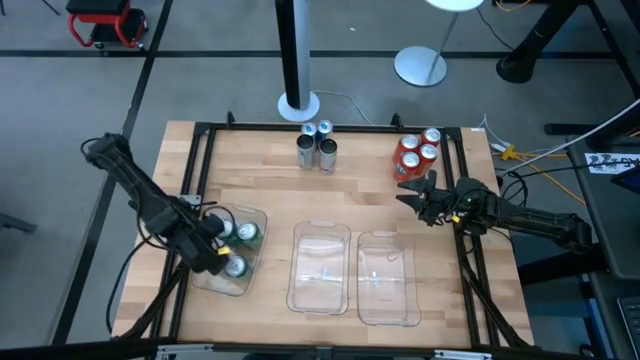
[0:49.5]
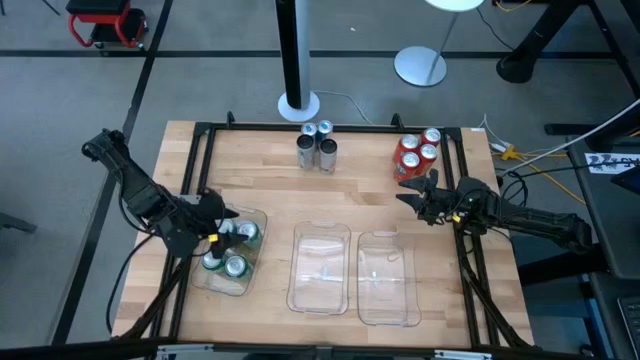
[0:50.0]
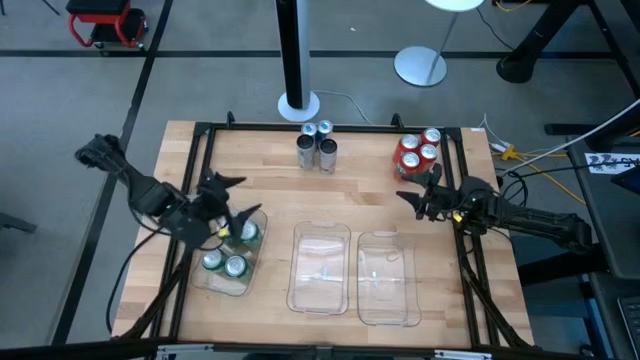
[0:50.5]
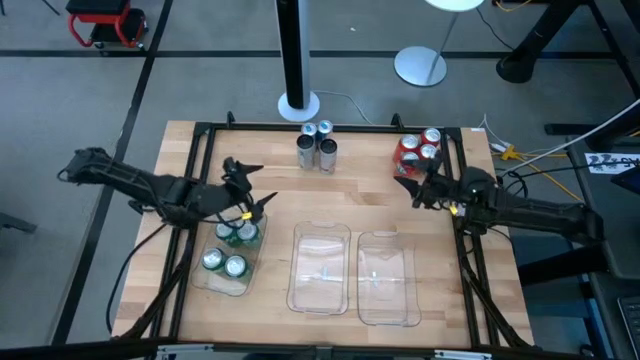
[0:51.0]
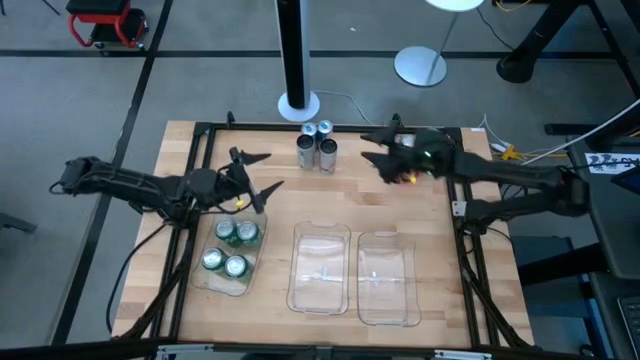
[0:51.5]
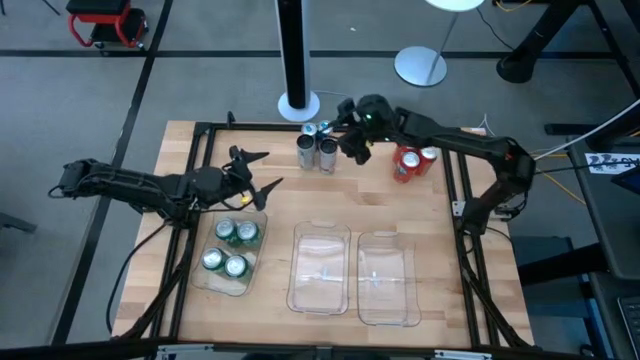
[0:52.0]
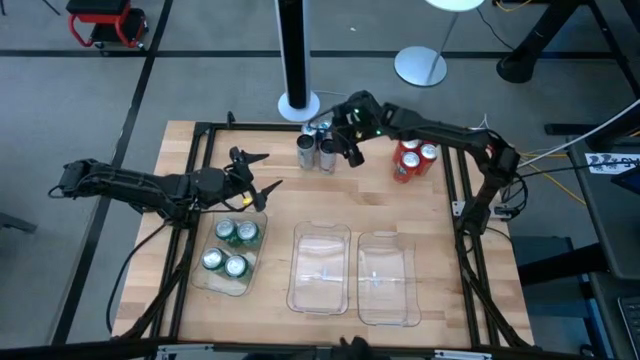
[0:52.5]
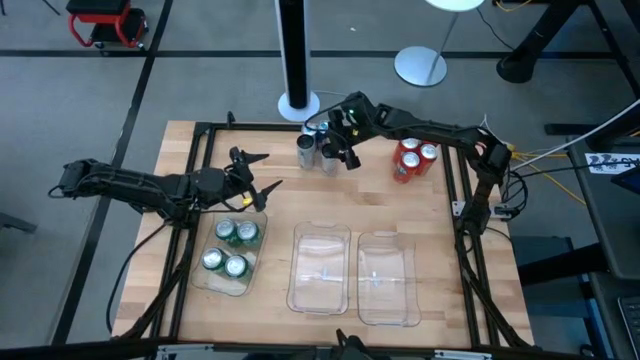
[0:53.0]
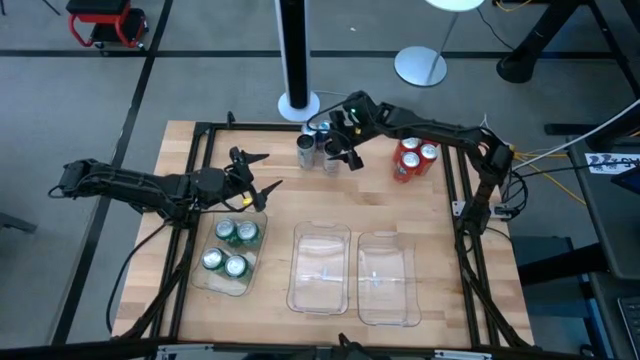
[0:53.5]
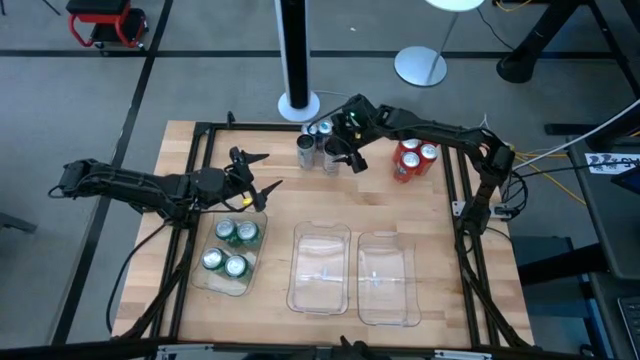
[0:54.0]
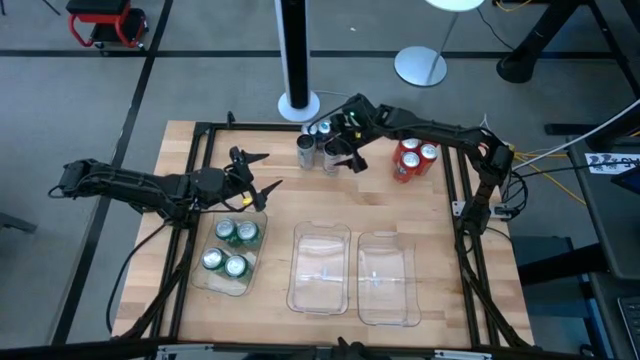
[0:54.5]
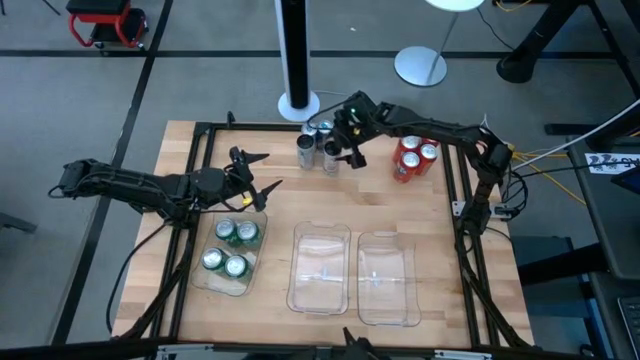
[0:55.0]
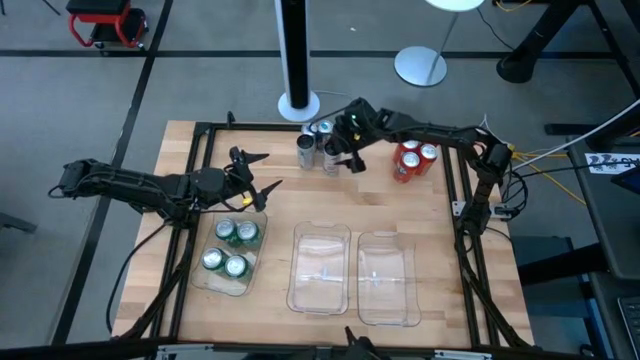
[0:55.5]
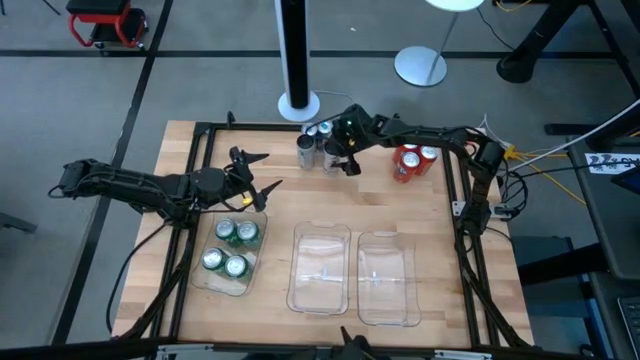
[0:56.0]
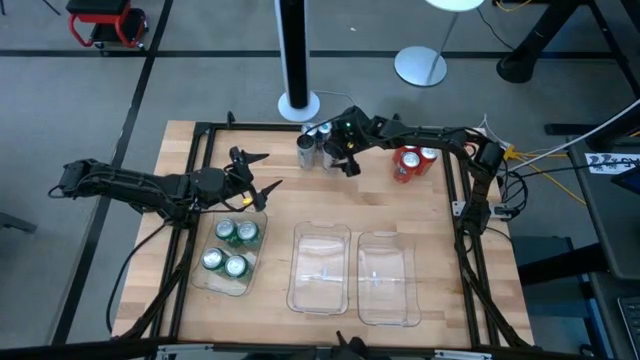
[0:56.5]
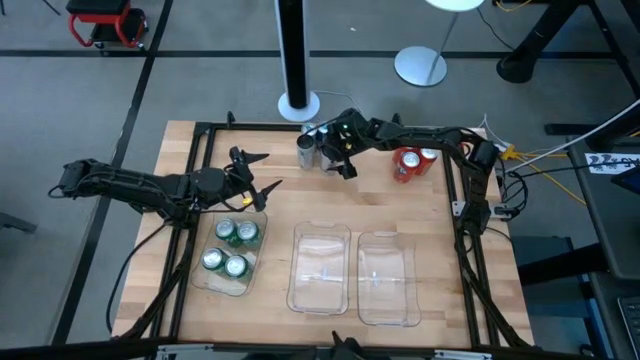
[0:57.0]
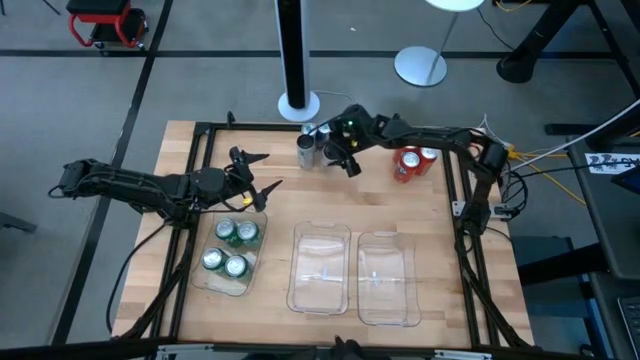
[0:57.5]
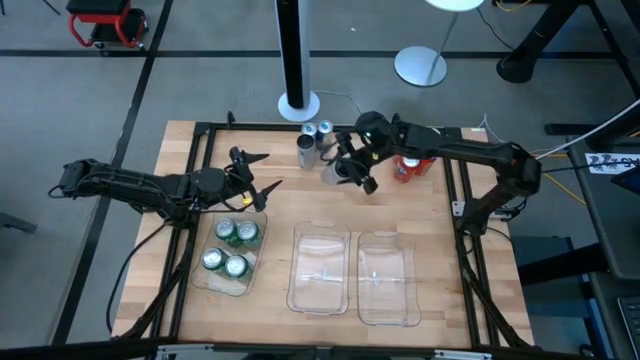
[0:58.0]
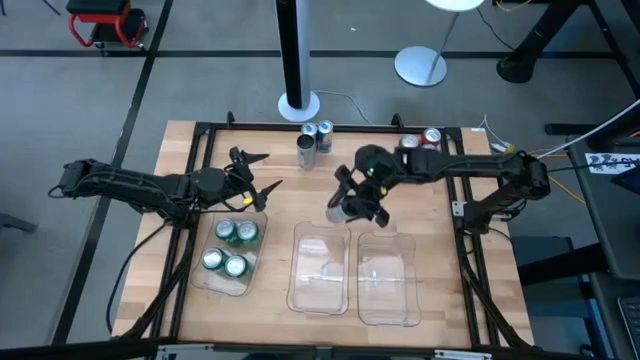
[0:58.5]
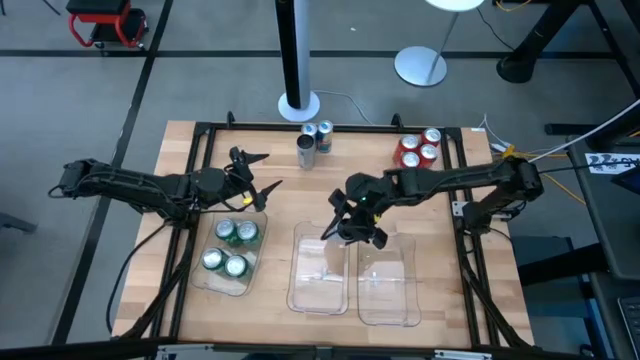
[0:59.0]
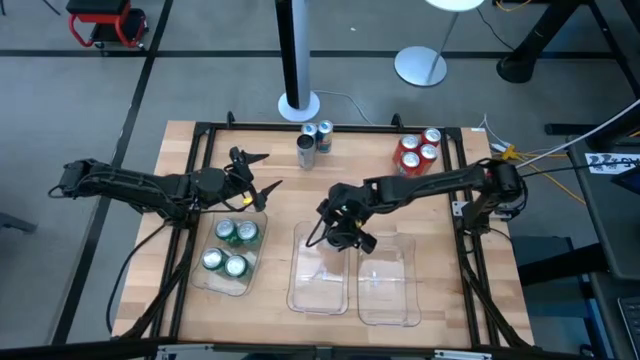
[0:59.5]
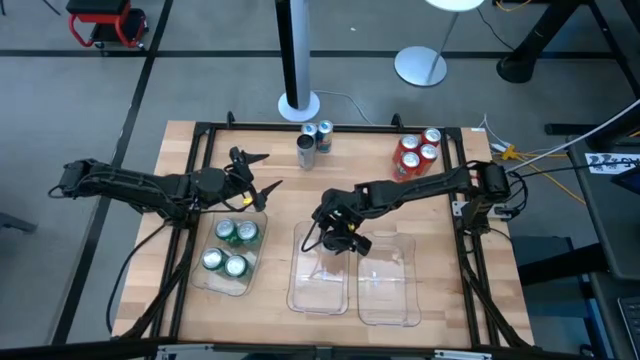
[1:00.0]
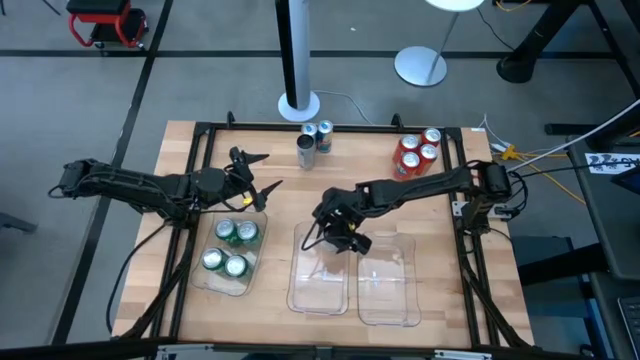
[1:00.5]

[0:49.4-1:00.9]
Task: Sort soda cans
Put the right white soda can into the middle transparent bin

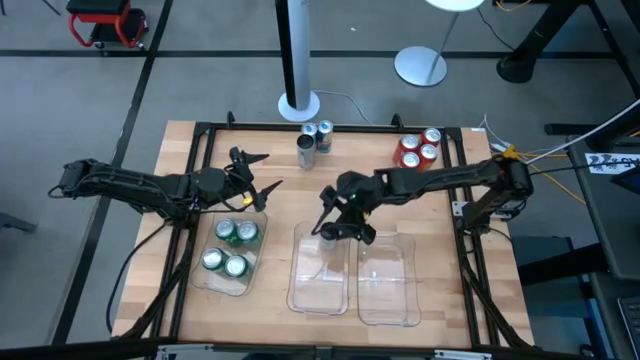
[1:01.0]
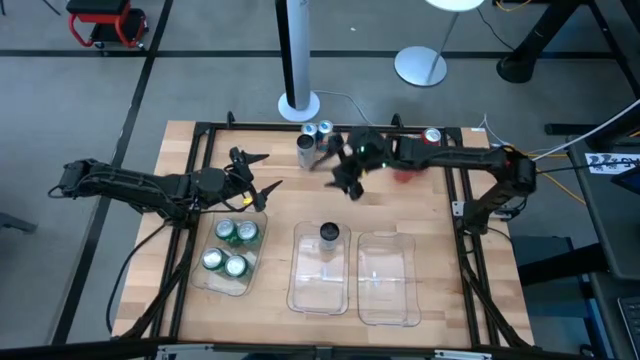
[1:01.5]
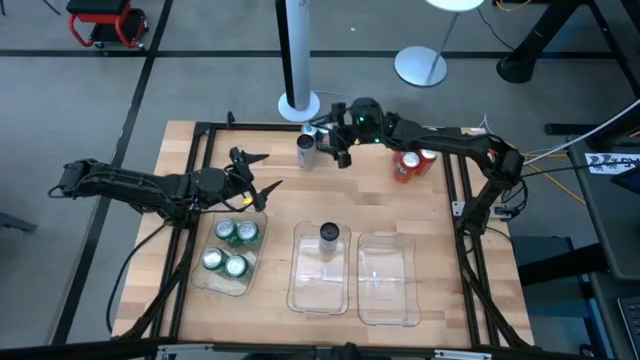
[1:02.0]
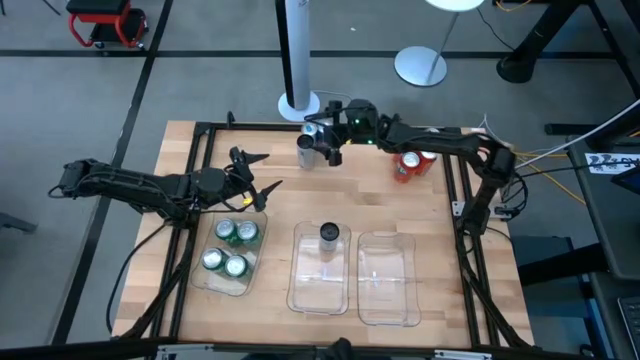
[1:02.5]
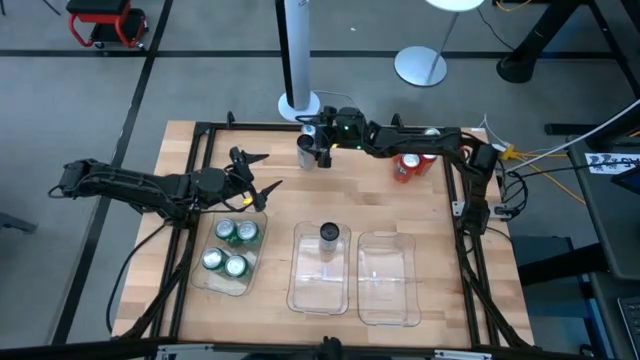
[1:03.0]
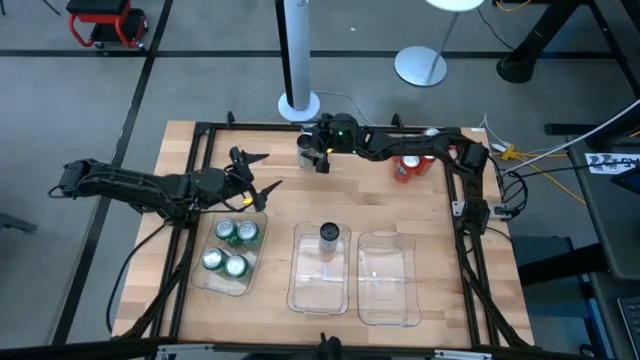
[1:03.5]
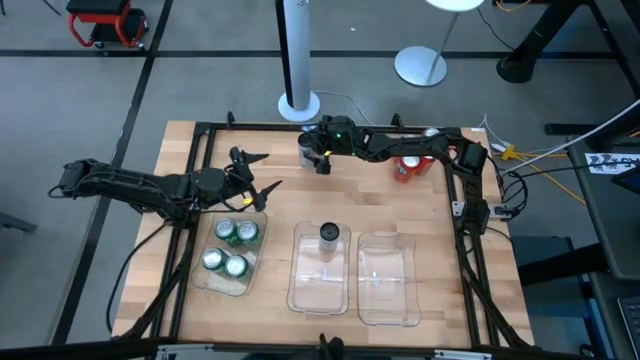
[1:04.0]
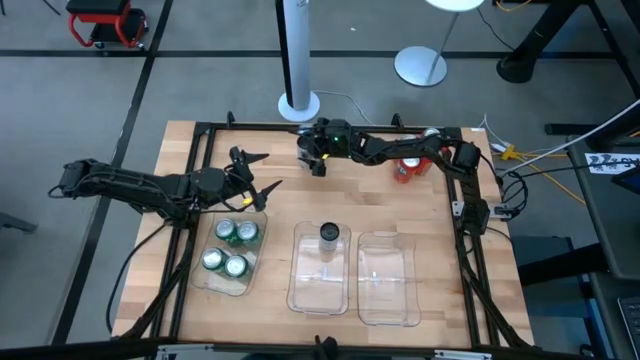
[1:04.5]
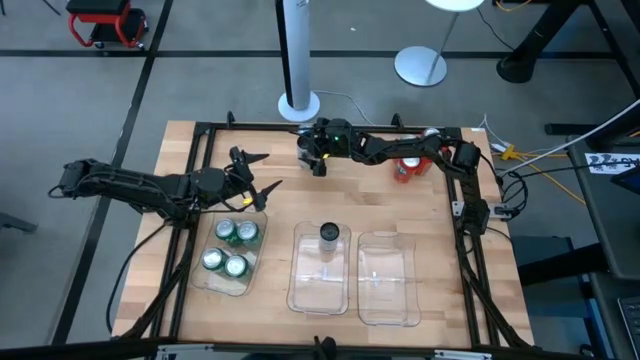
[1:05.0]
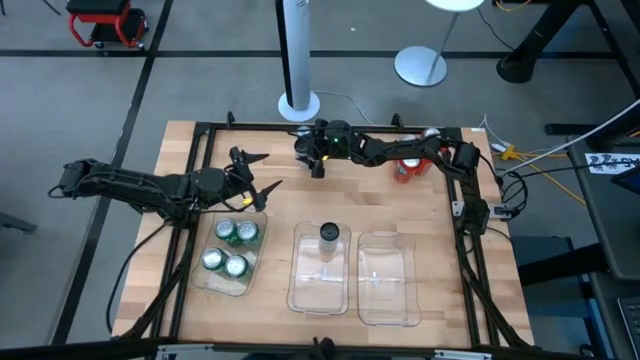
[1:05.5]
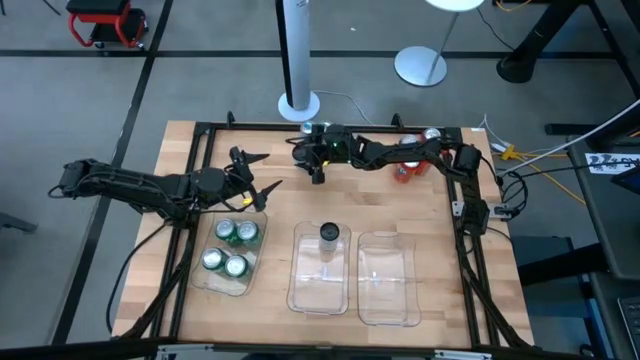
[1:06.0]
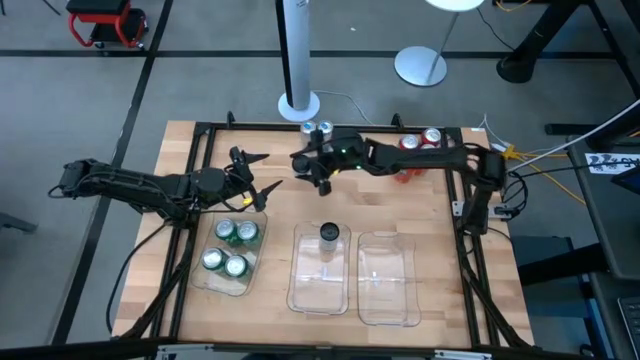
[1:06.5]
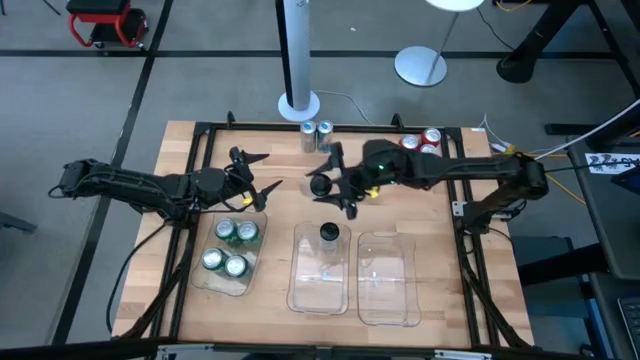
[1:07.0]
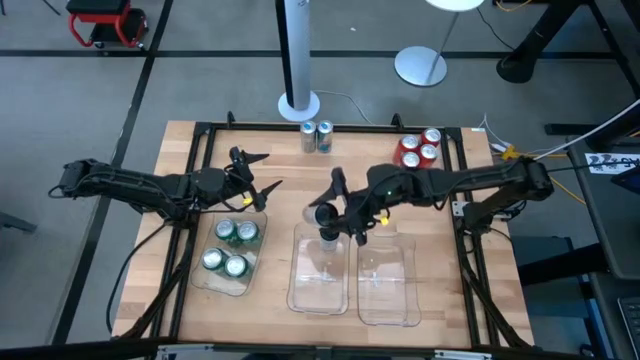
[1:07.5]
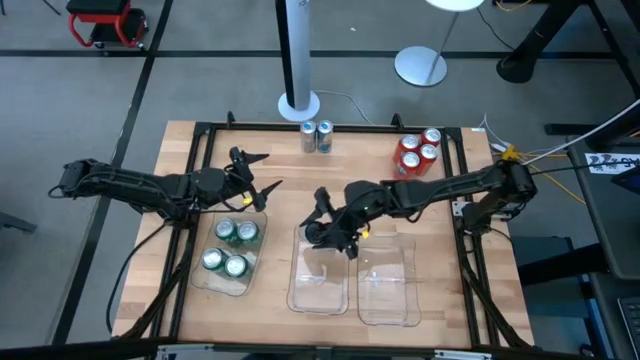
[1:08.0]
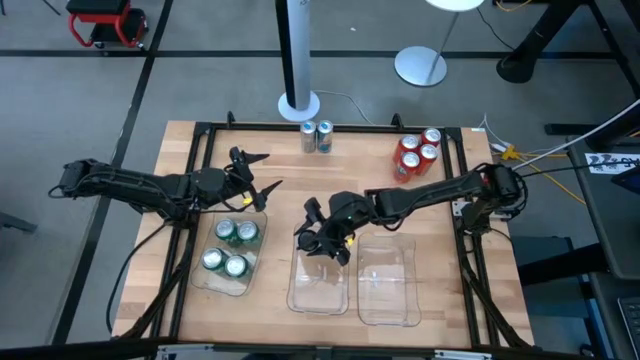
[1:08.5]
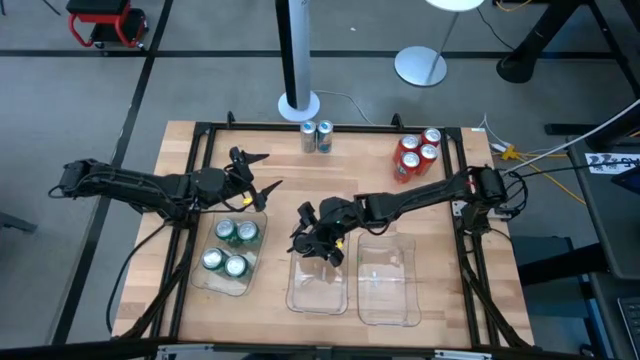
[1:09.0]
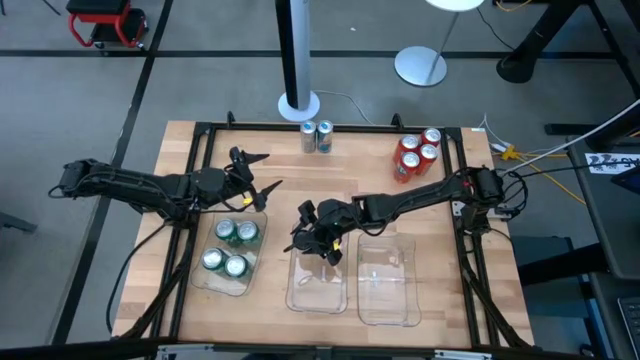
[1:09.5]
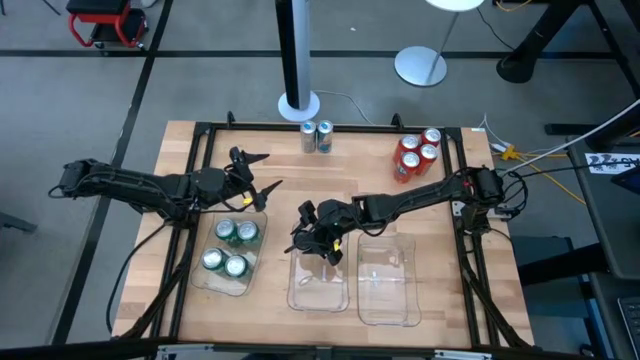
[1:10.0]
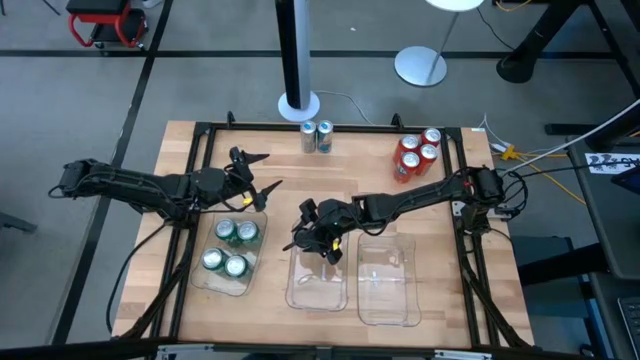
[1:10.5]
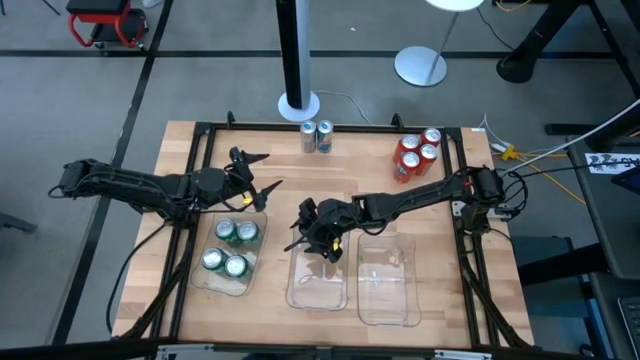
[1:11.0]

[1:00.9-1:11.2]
Put the white soda can into the middle transparent bin

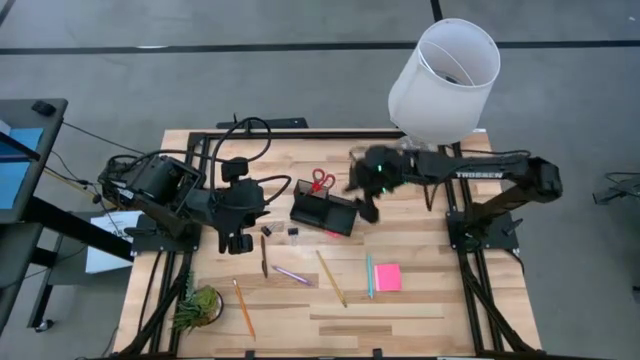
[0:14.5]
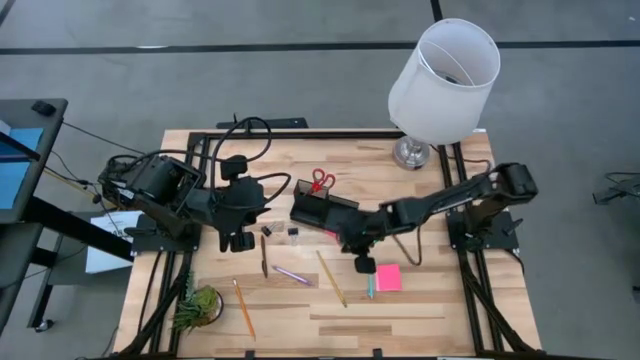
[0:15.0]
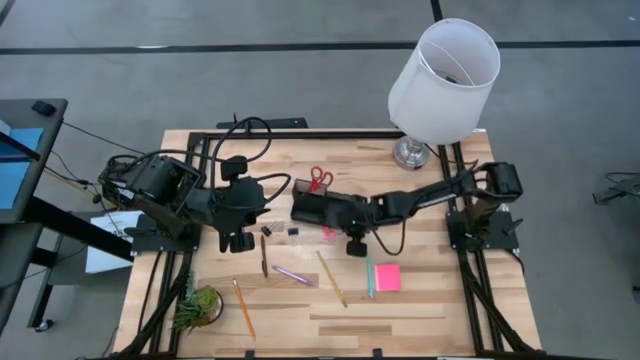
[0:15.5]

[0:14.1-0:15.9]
Task: Pick and place office supplies into organizer
Adjust the black desk organizer
